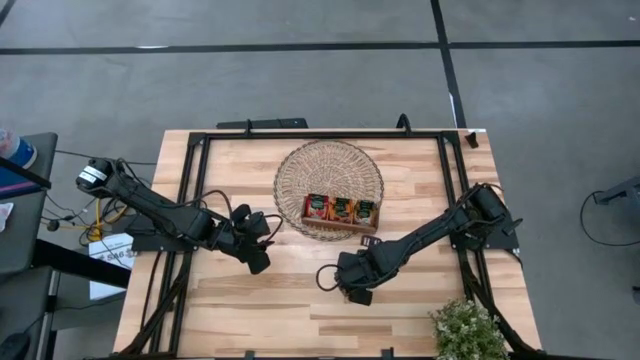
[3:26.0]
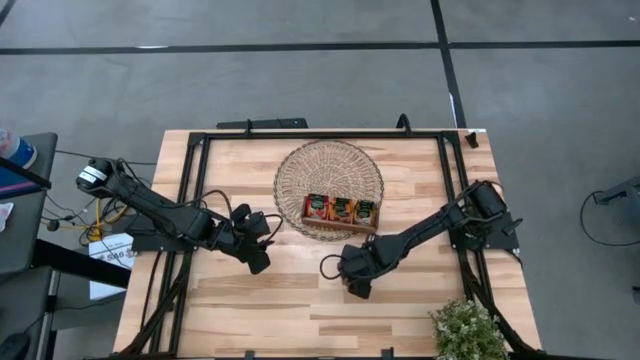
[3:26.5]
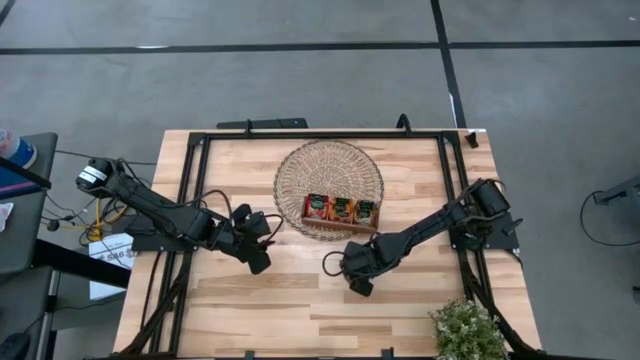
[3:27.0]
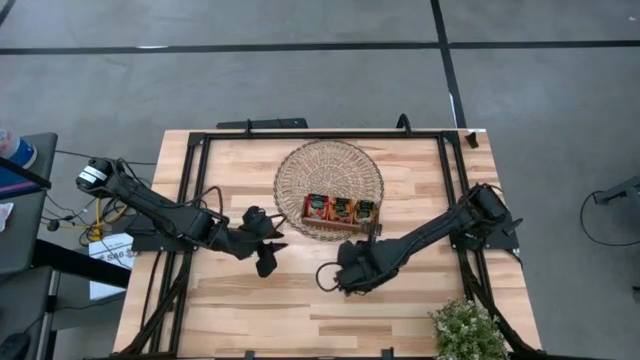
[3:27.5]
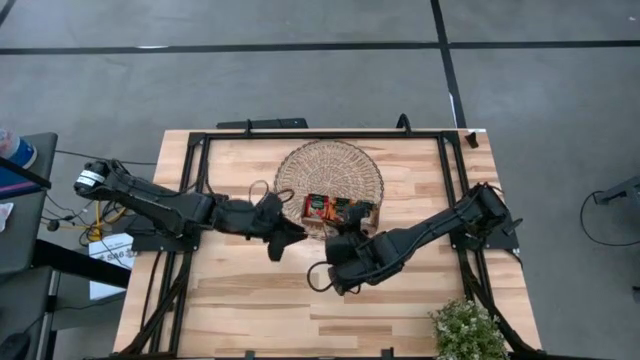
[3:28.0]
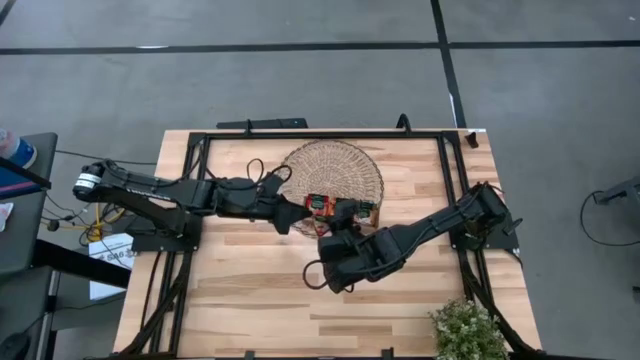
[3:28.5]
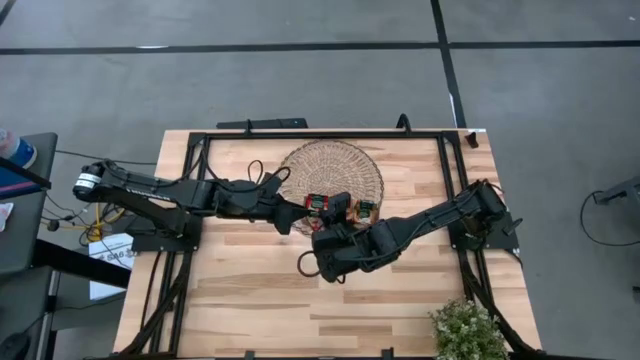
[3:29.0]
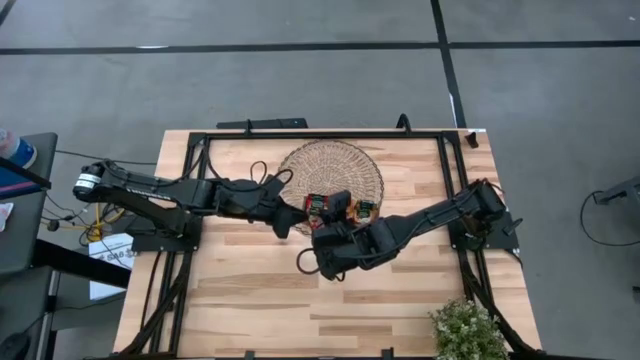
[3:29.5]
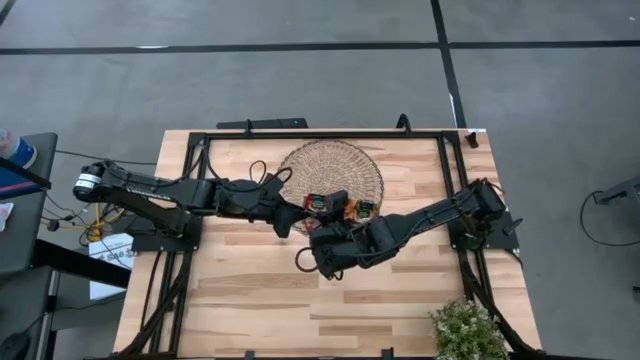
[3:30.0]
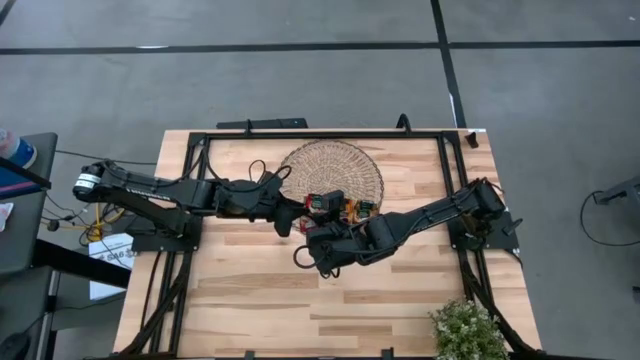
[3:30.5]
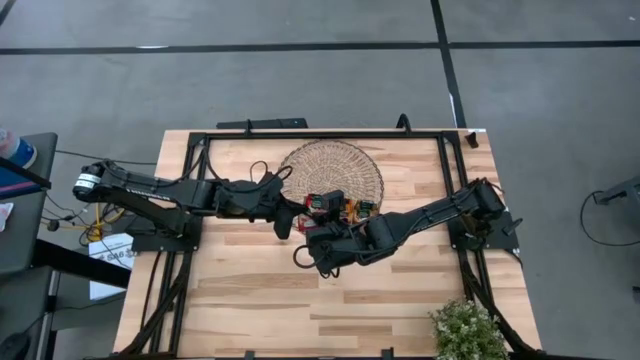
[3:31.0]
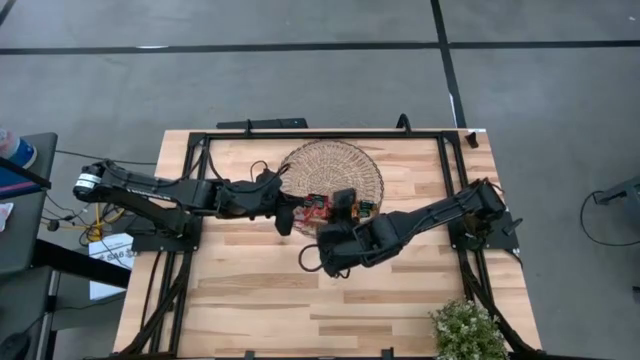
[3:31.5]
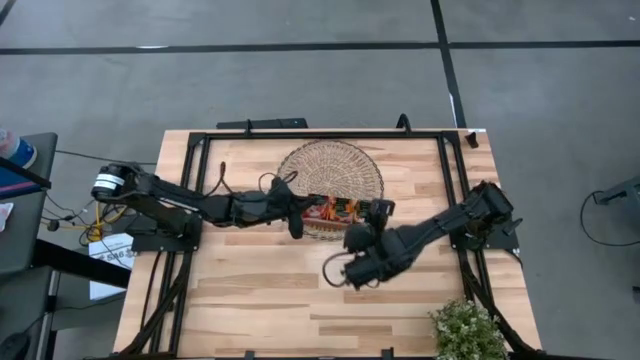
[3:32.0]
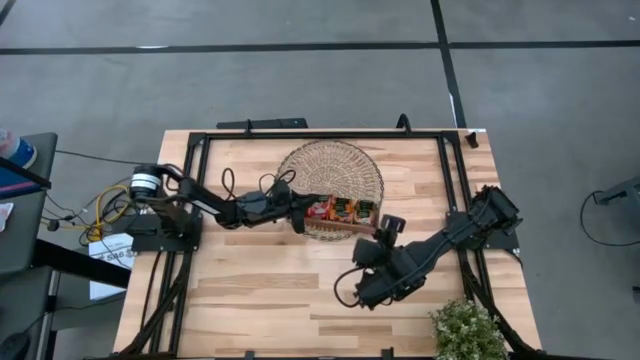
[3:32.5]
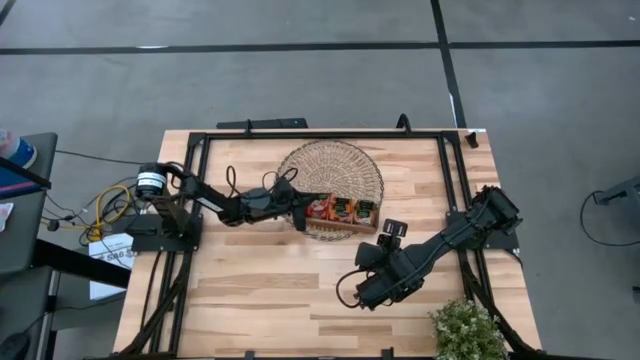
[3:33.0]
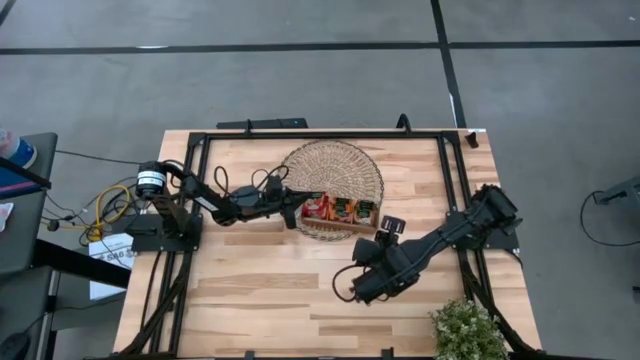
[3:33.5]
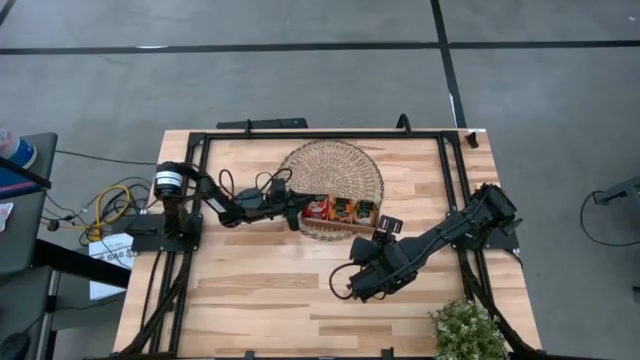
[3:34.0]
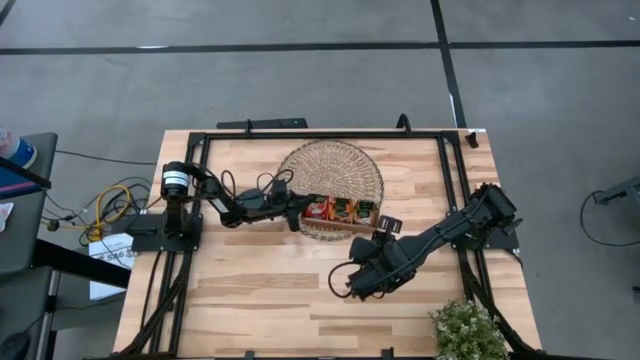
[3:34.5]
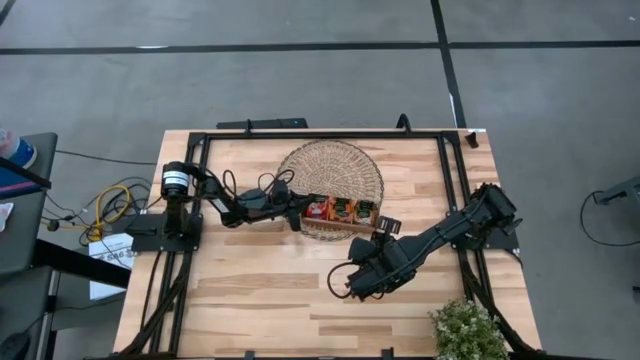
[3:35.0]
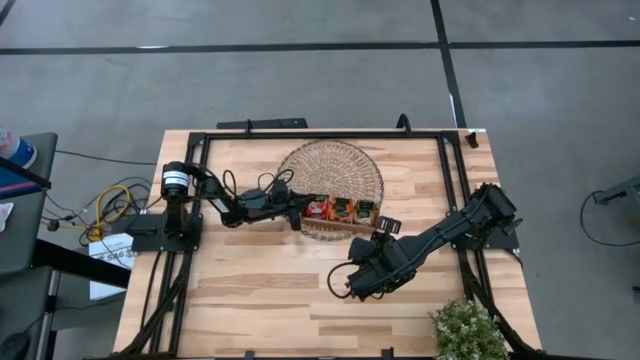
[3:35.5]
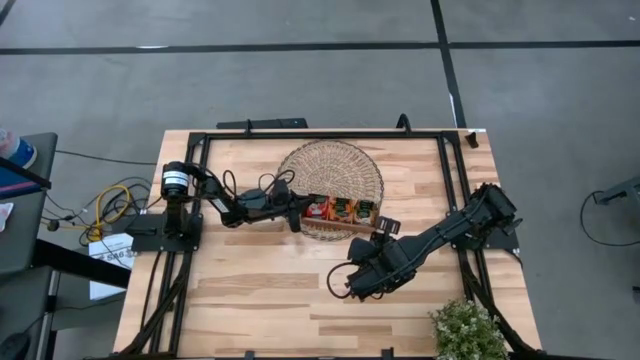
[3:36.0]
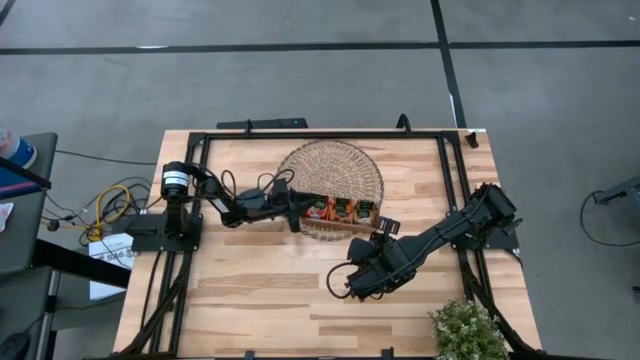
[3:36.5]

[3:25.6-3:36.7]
Task: Pick & Place Tea
Put the red tea bag into the left section of the wooden organizer

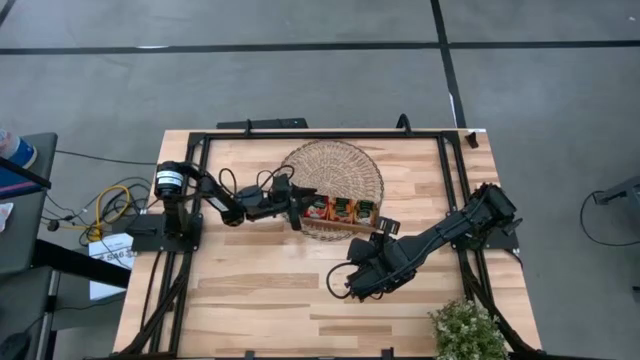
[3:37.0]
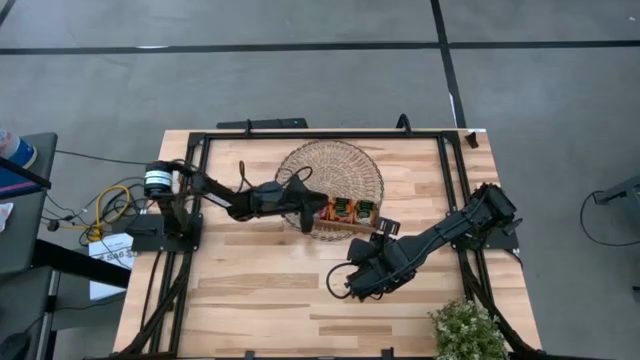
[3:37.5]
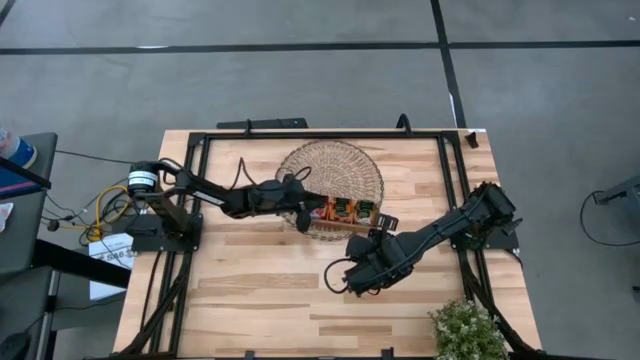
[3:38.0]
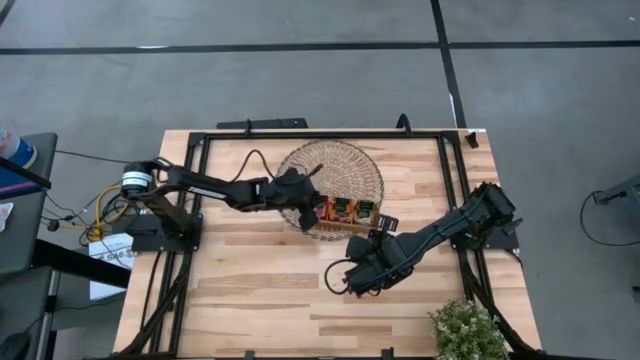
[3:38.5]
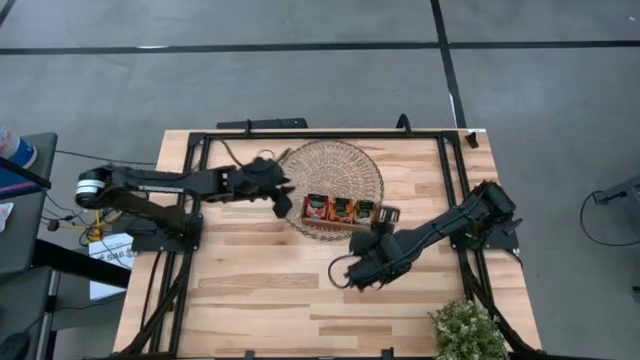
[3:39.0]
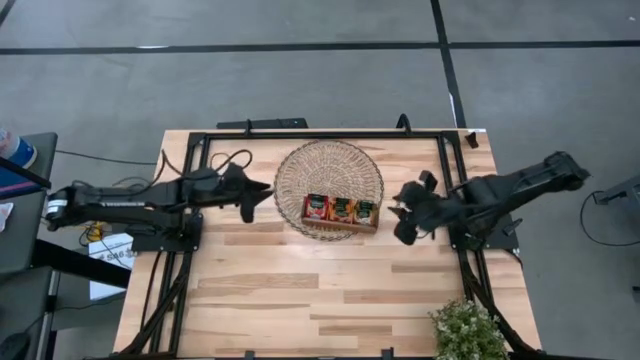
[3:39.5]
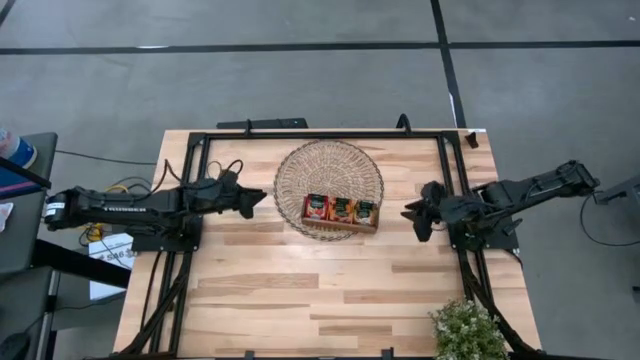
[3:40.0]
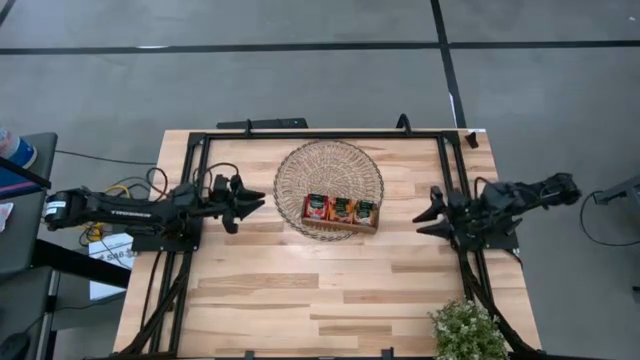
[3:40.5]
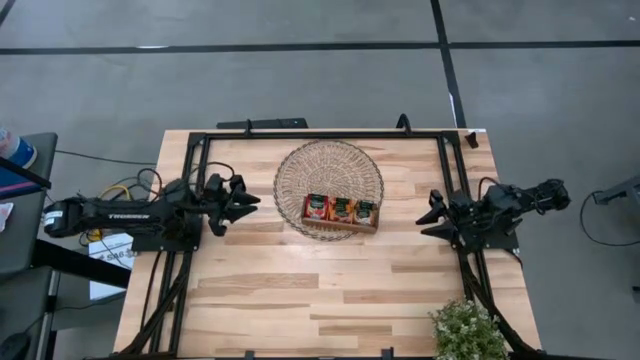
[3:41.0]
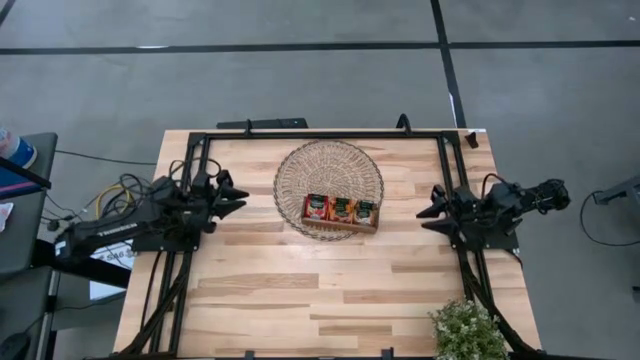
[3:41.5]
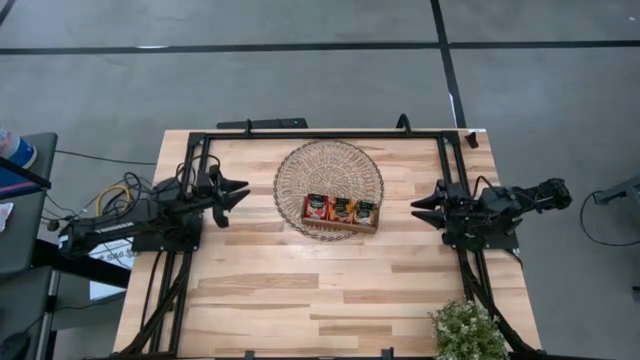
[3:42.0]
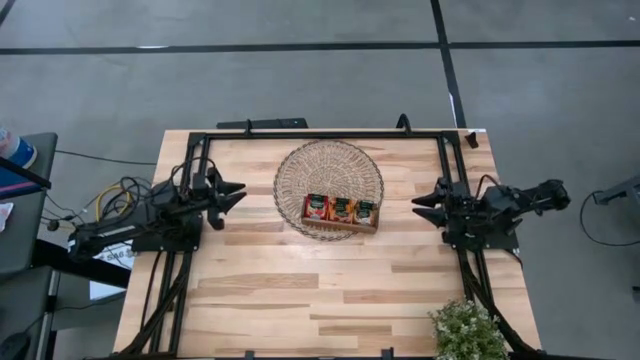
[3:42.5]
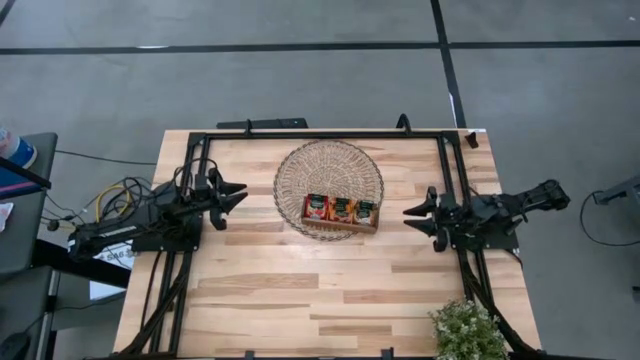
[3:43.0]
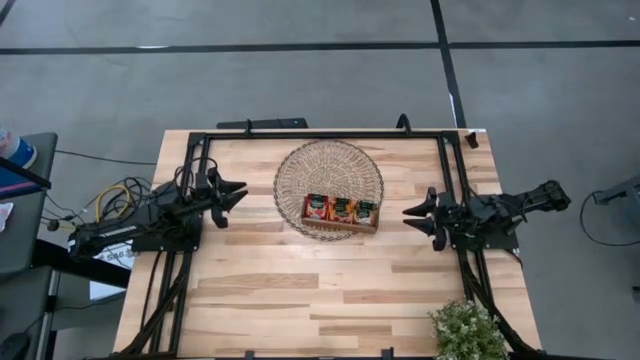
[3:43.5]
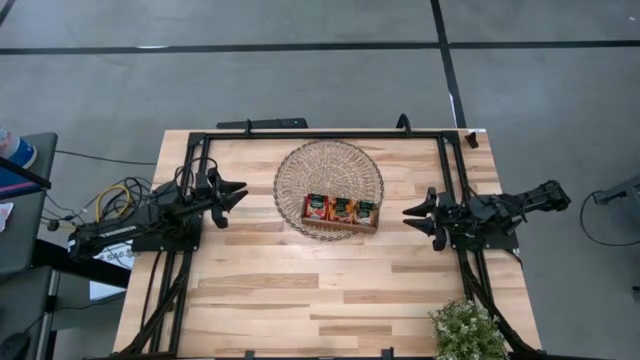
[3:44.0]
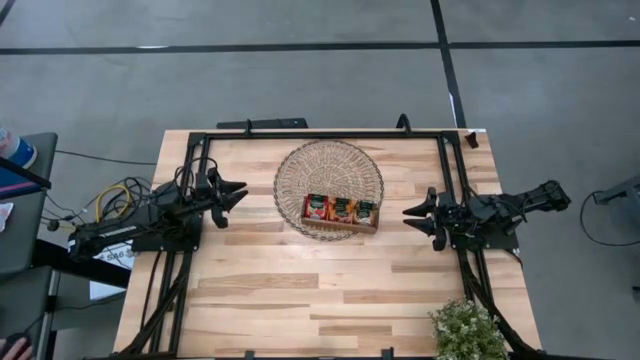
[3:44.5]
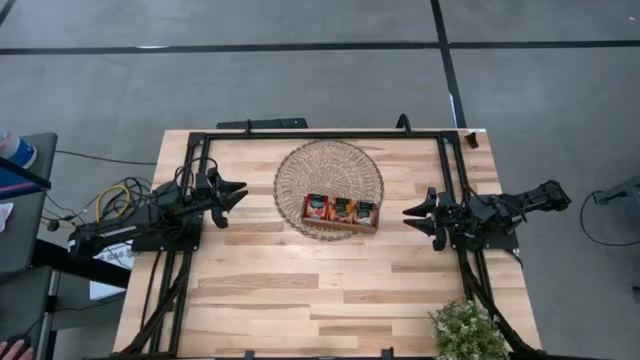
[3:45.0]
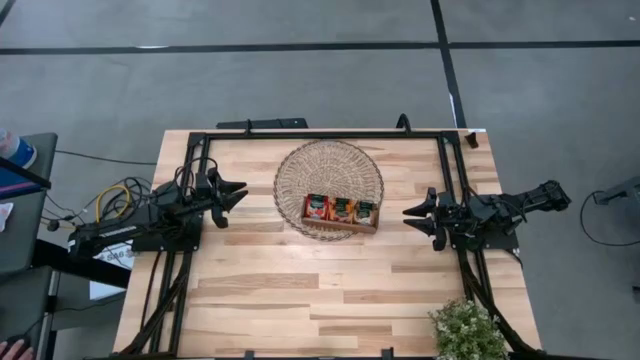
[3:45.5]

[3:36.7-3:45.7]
Return to Home Position

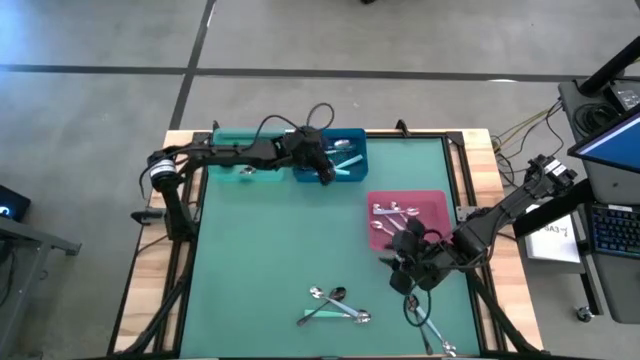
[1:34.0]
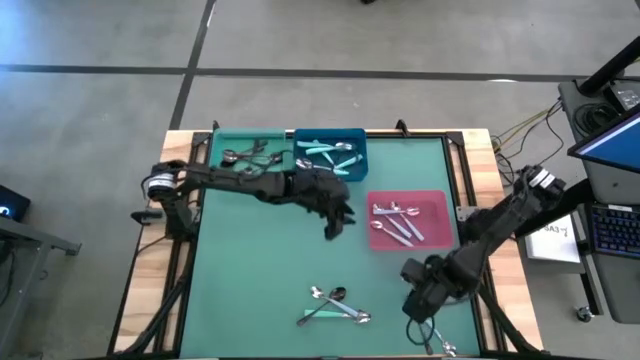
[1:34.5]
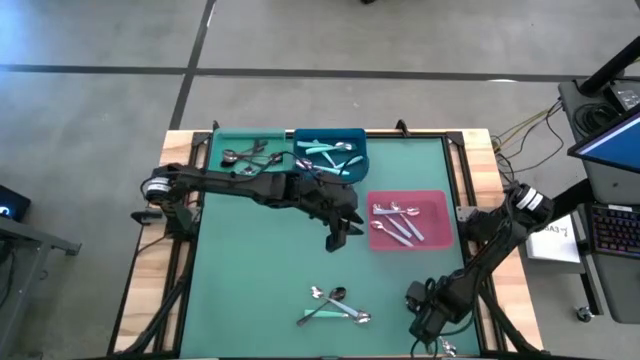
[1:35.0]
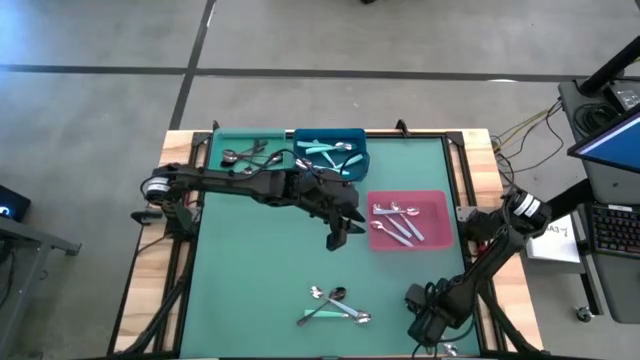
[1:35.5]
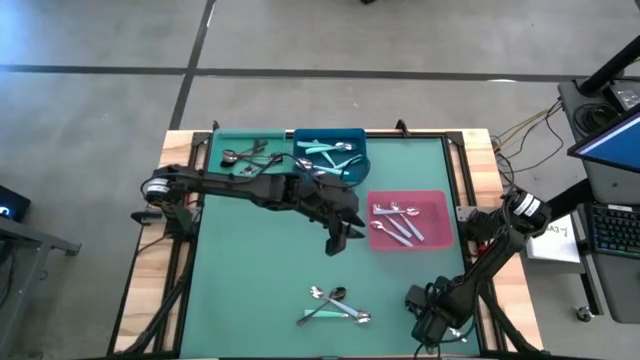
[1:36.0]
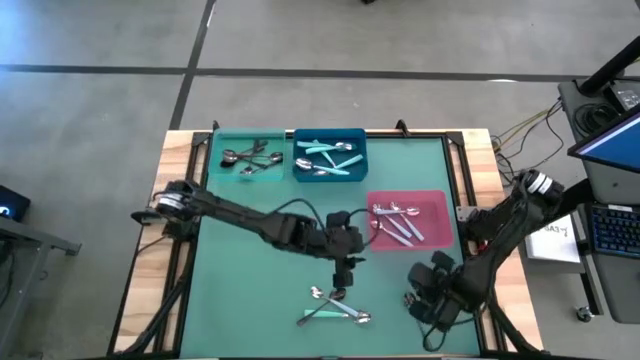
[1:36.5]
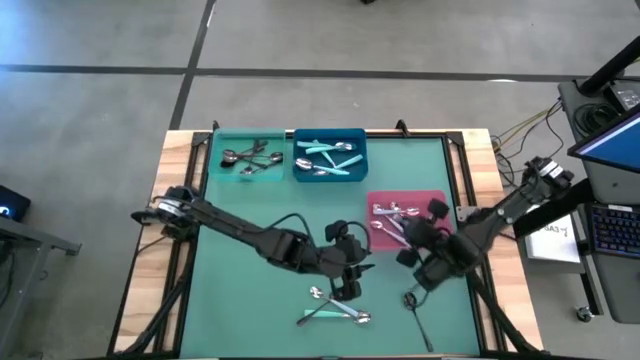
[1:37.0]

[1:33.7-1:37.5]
Task: Sort silverware by color (type)
Put the blue spoon into the red bin
